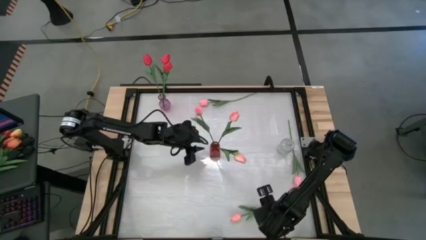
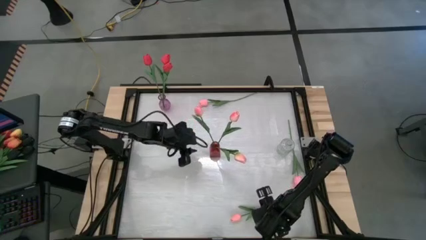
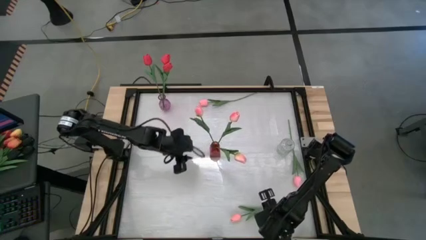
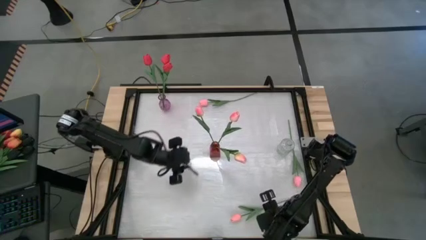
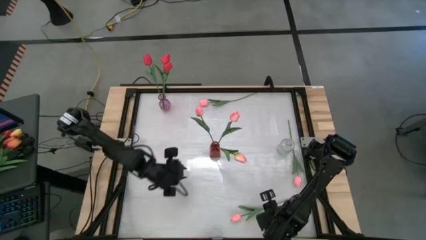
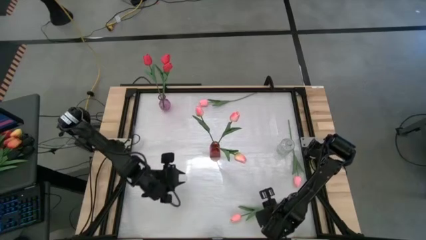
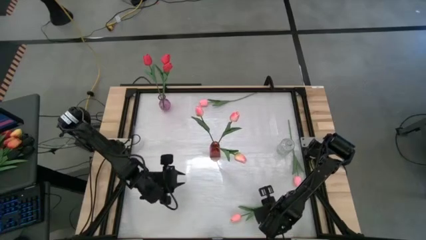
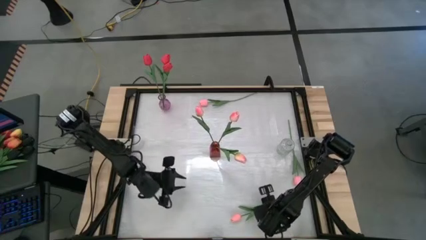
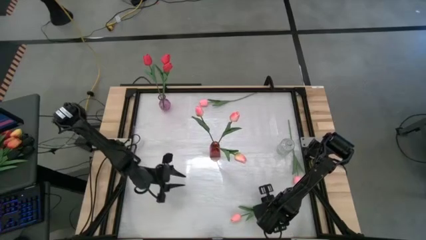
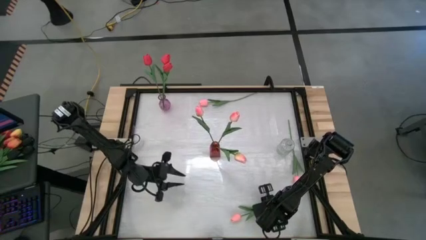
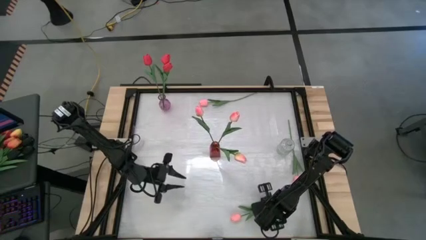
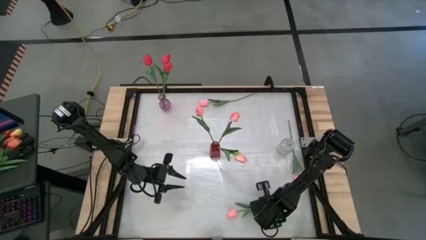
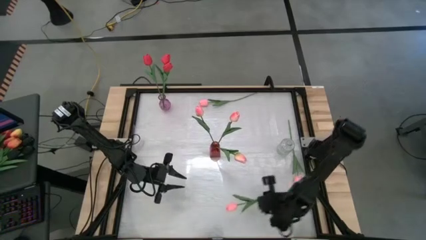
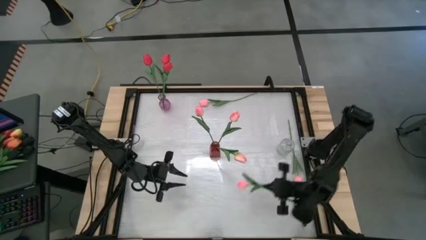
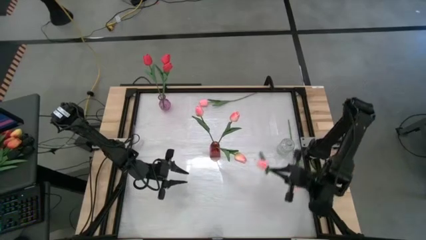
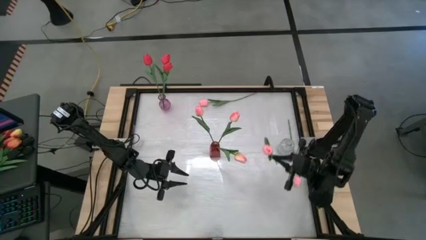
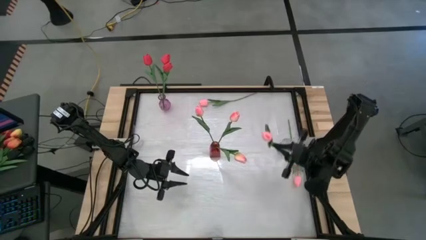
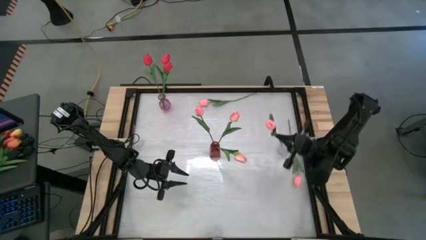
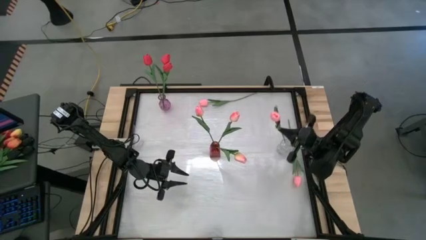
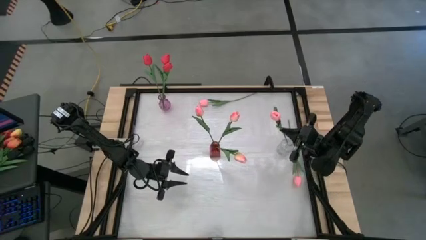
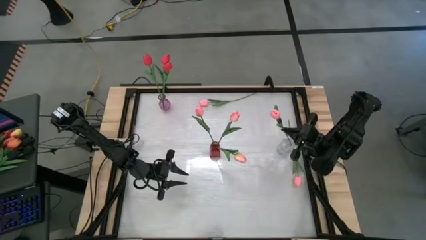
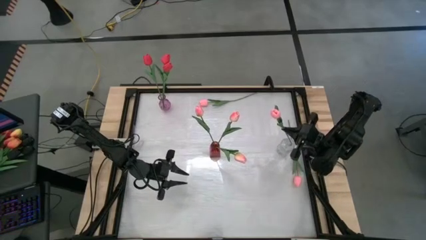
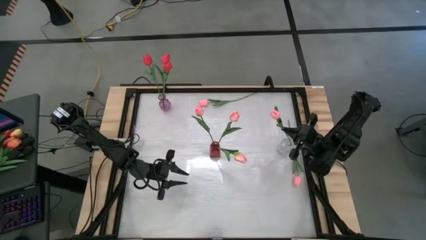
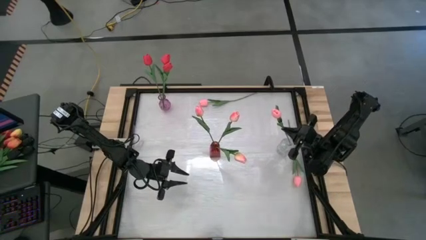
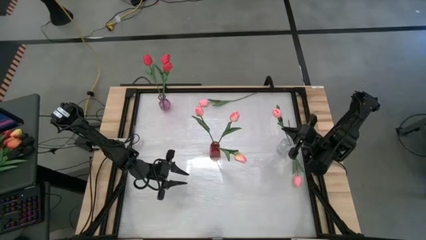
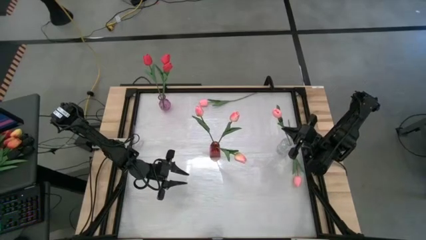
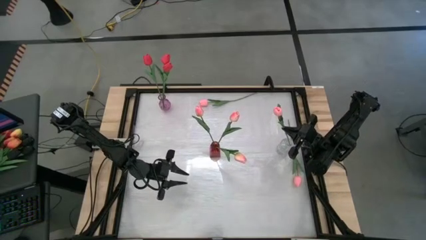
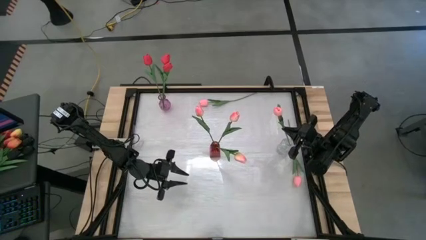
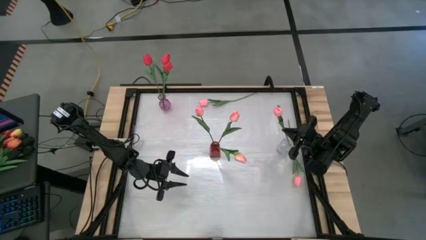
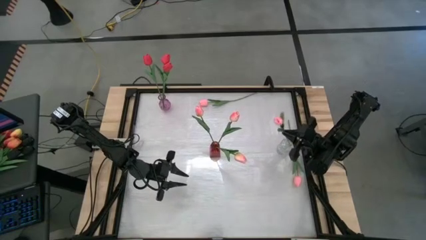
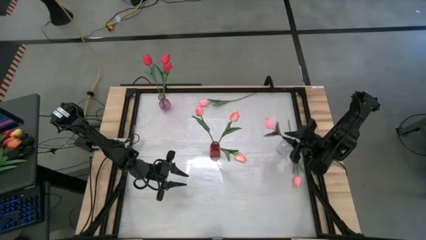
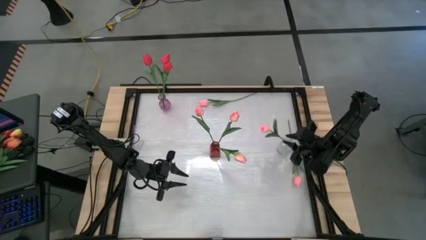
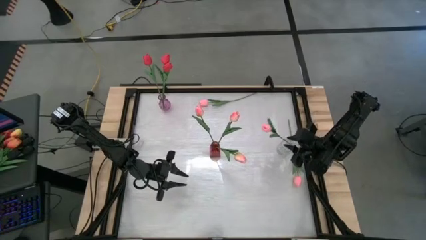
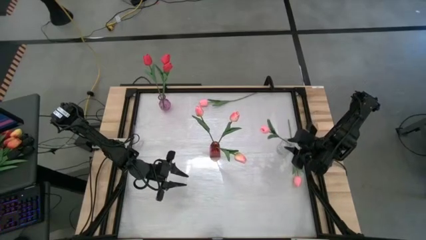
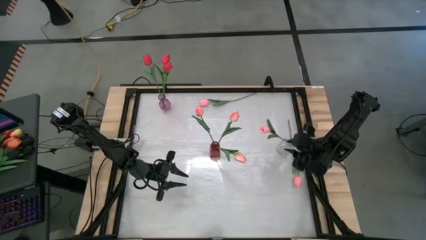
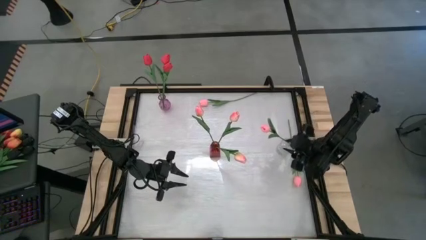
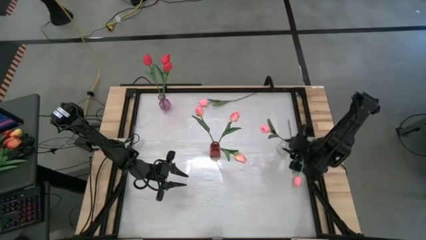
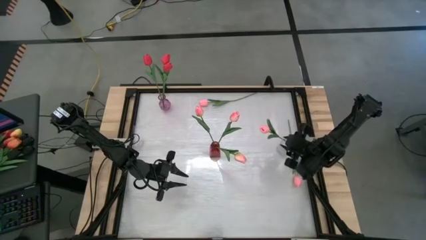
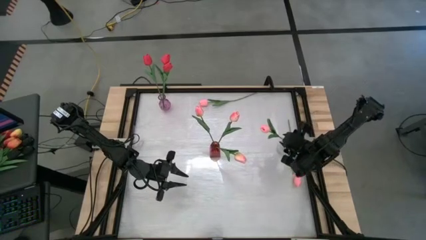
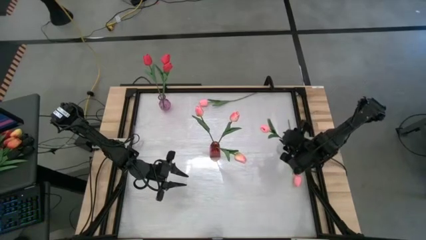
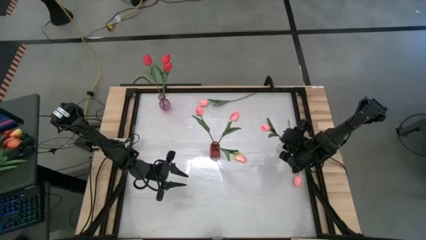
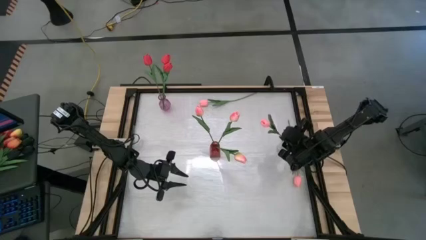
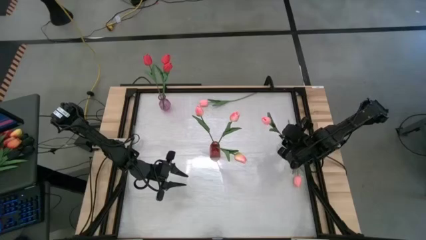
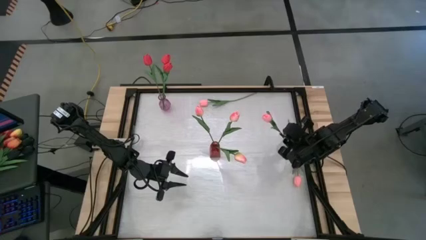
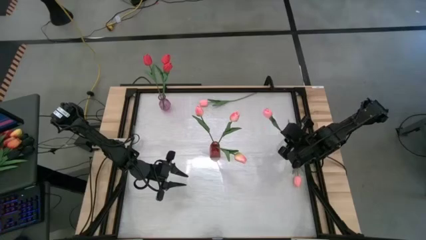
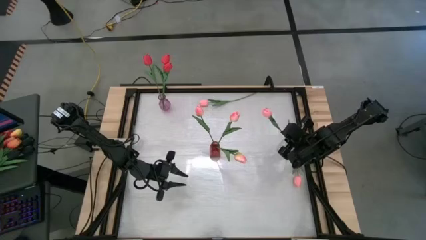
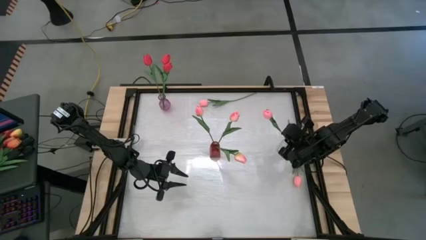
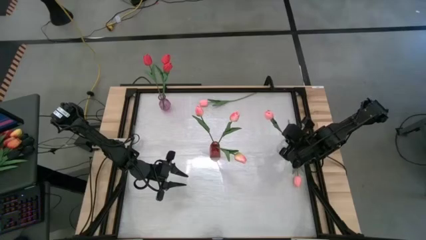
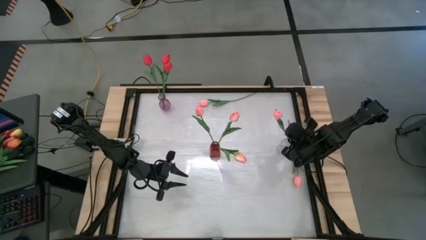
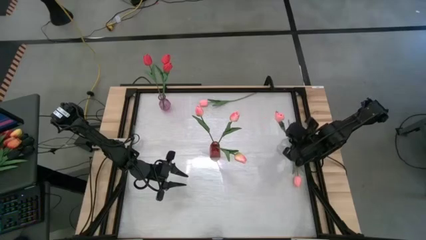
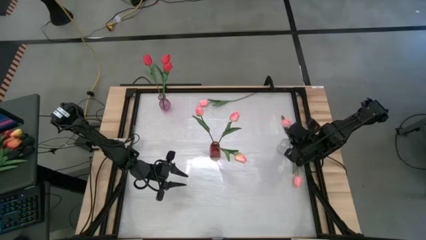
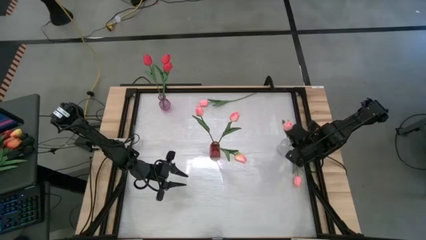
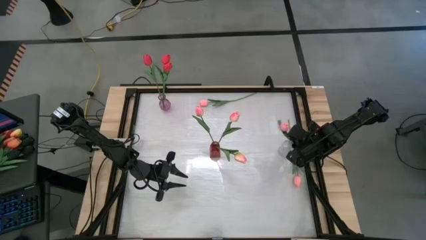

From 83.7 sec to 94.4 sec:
Task: Sort flowers into vase by color
Put the bottom pink tulip into the transparent vase

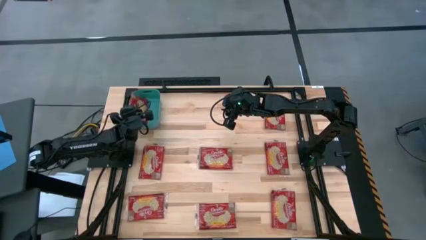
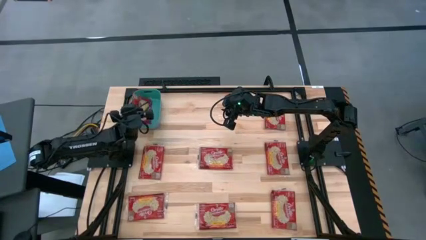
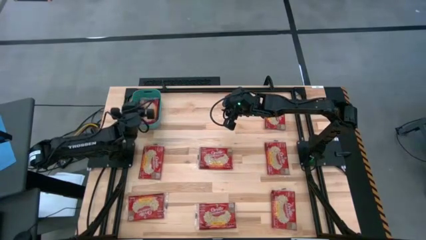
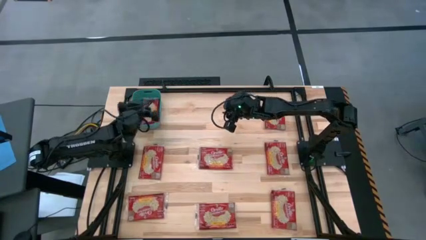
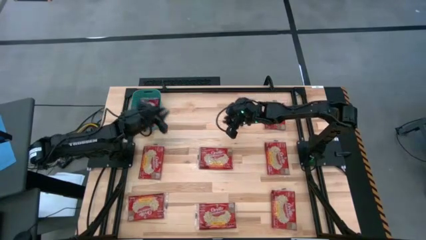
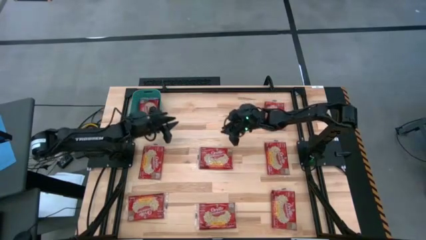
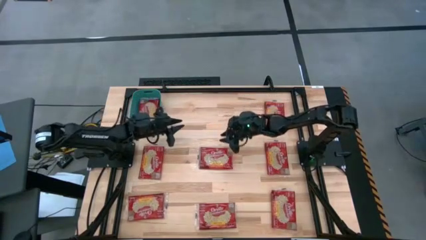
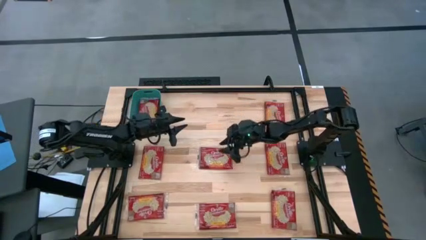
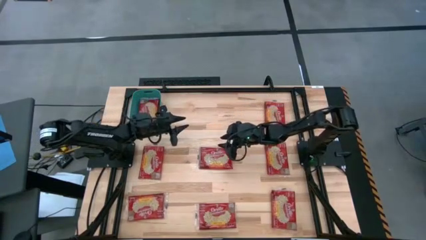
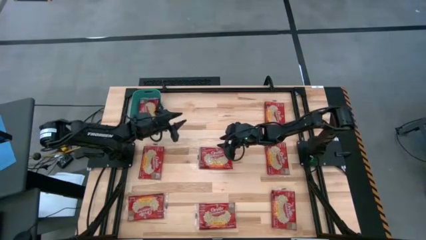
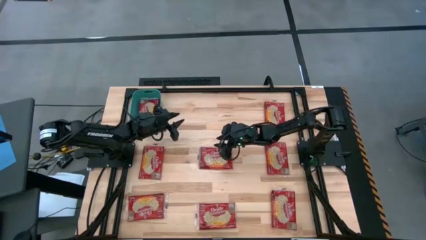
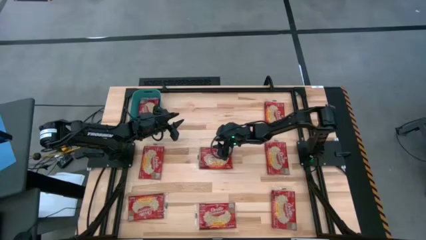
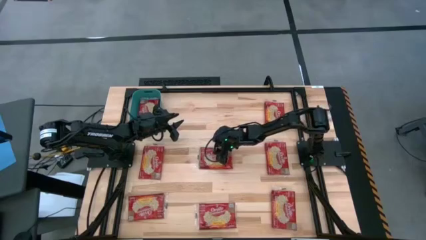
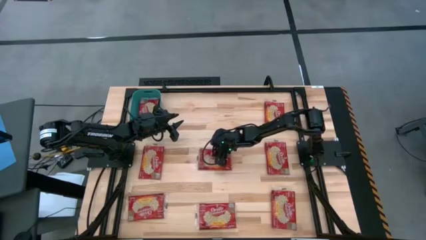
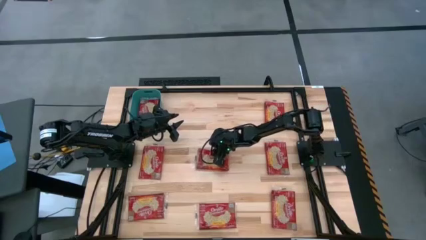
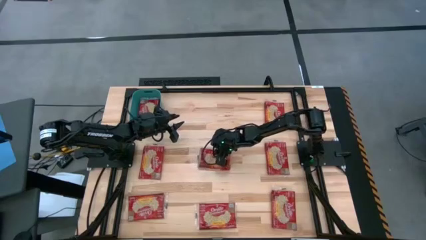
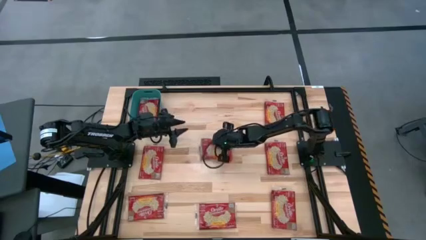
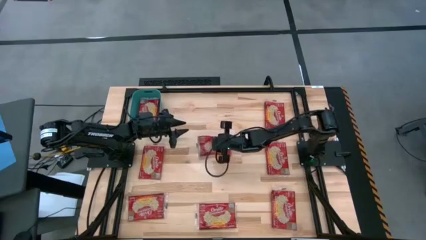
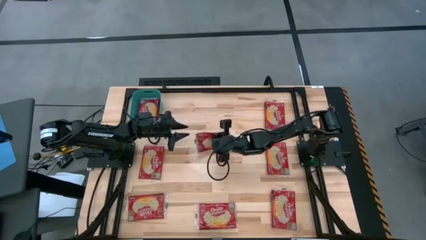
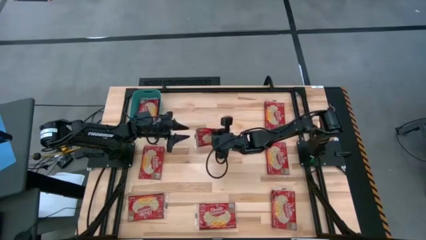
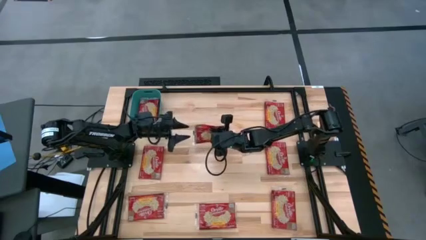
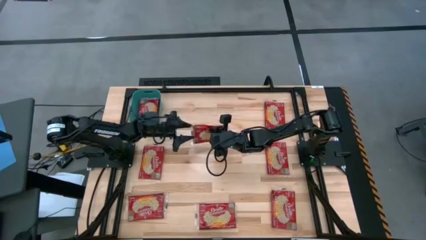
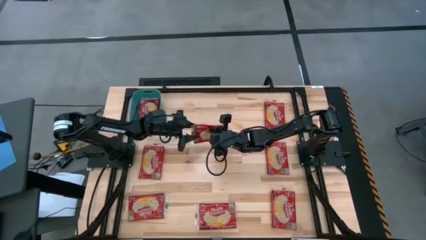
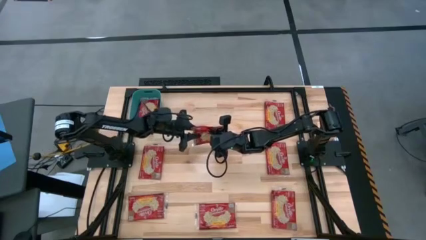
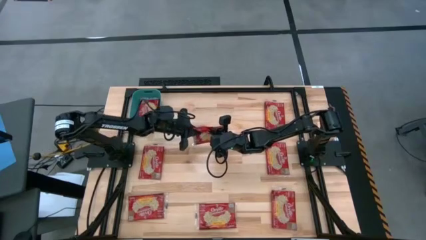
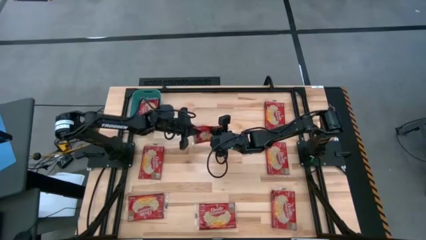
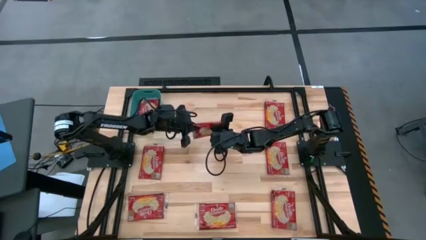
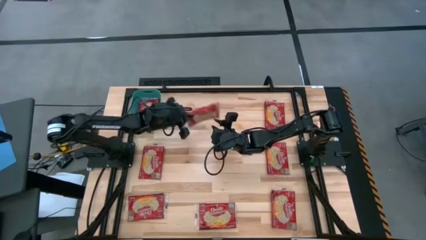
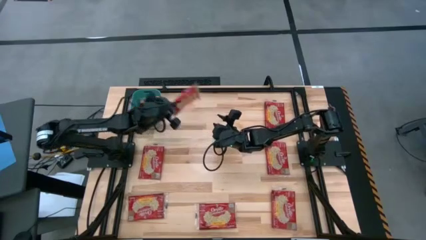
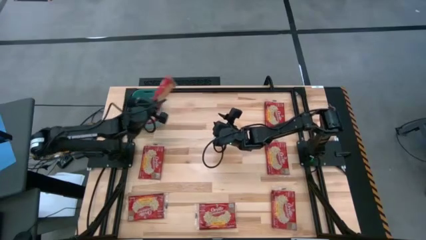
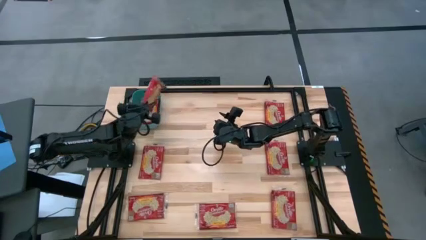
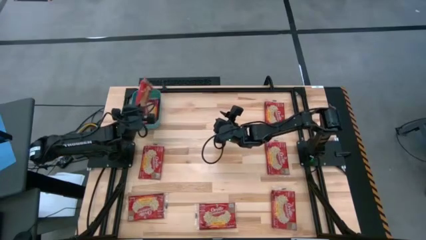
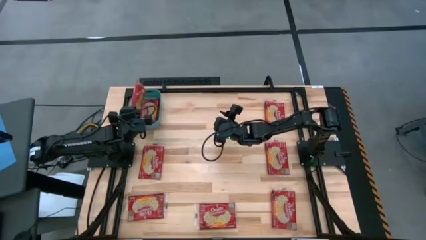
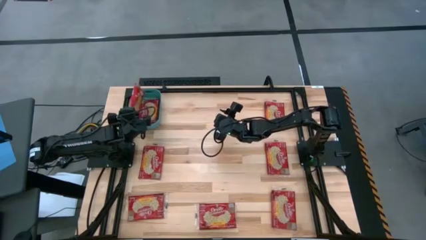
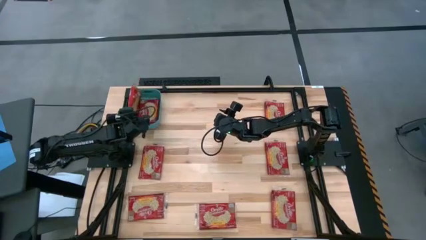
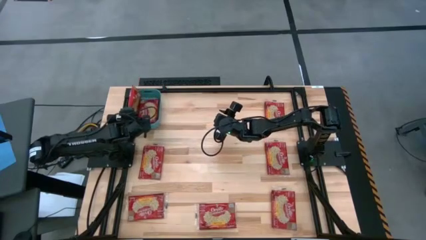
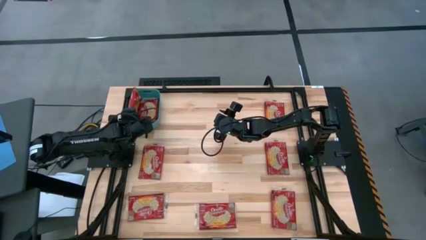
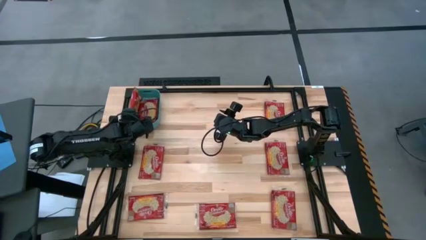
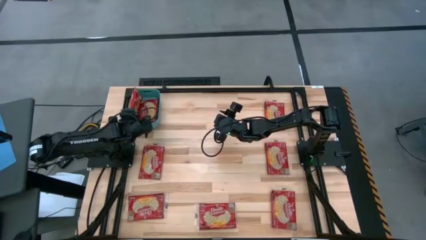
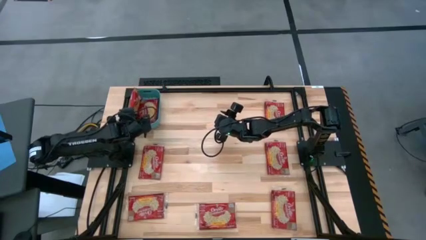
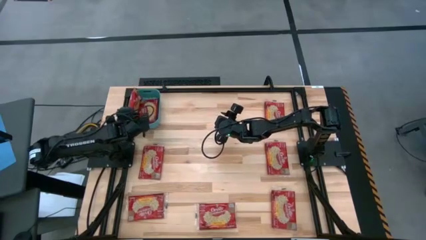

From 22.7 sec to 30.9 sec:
Task: Sort popcorn bags into baskets
Put the red popcorn bag in the blue bin
